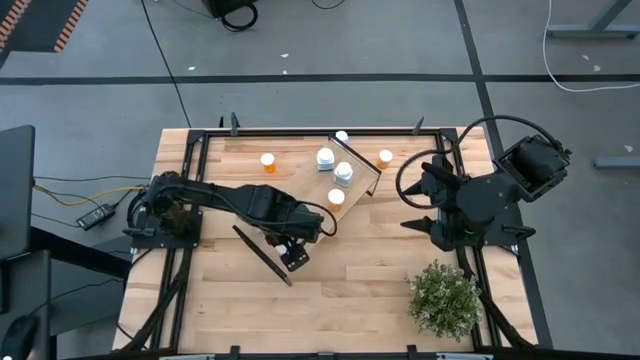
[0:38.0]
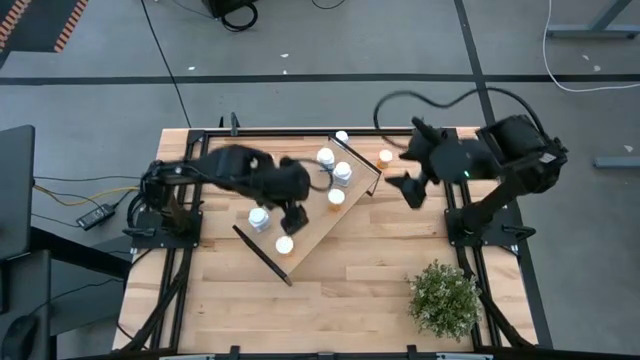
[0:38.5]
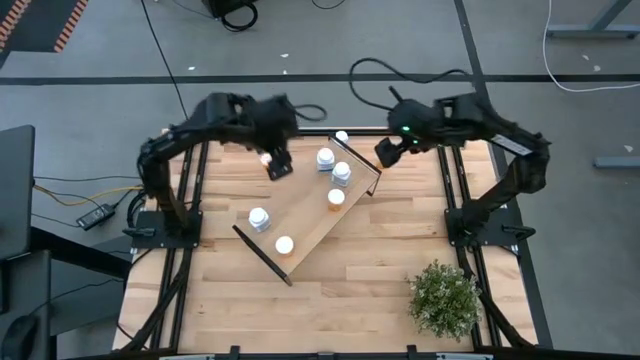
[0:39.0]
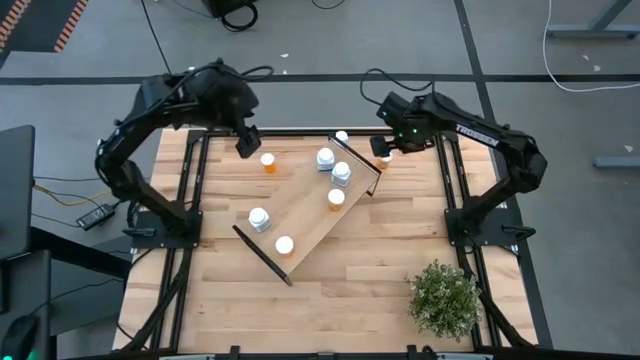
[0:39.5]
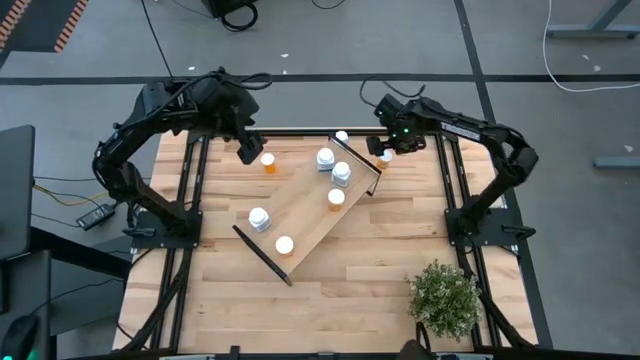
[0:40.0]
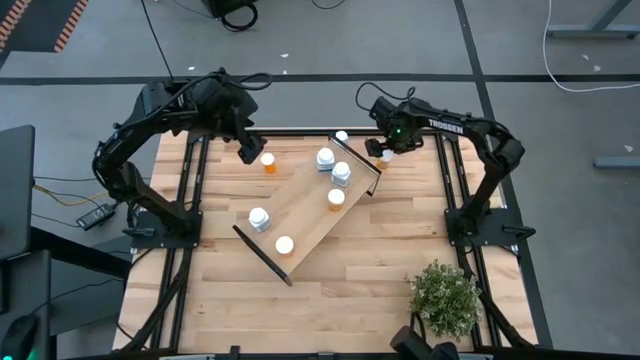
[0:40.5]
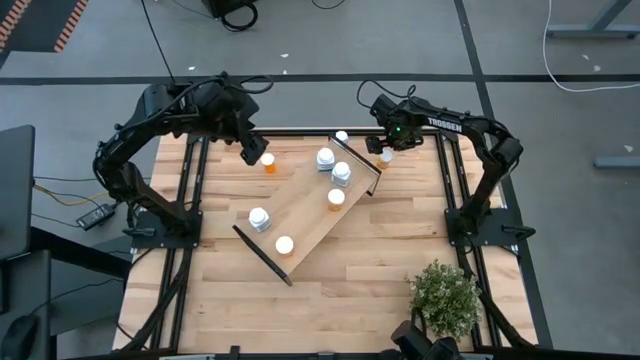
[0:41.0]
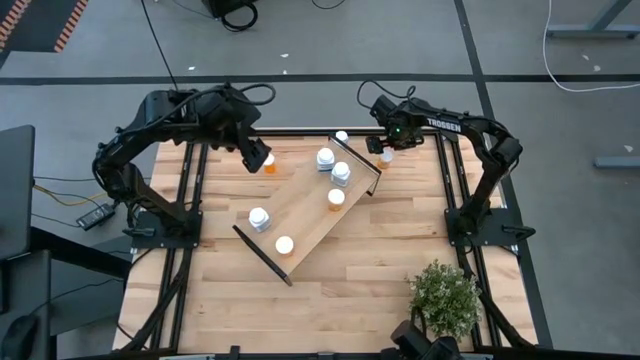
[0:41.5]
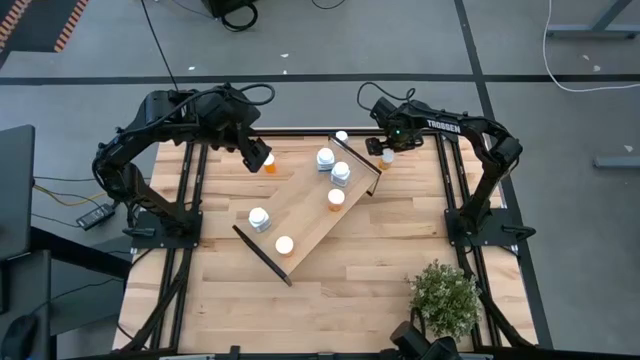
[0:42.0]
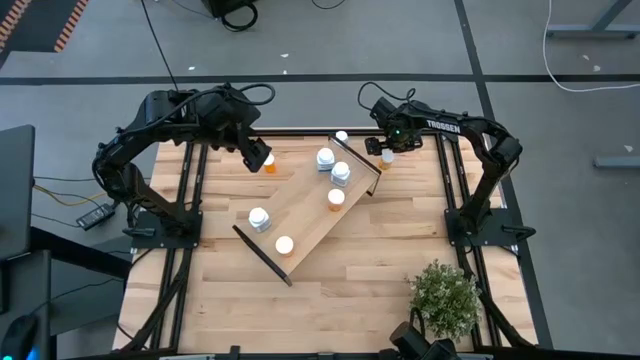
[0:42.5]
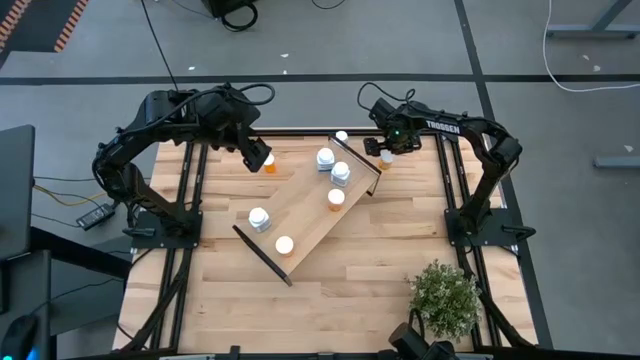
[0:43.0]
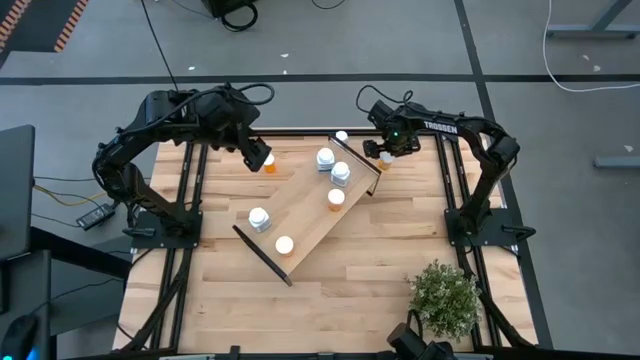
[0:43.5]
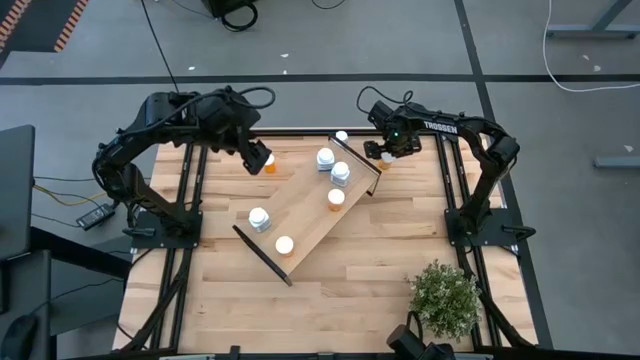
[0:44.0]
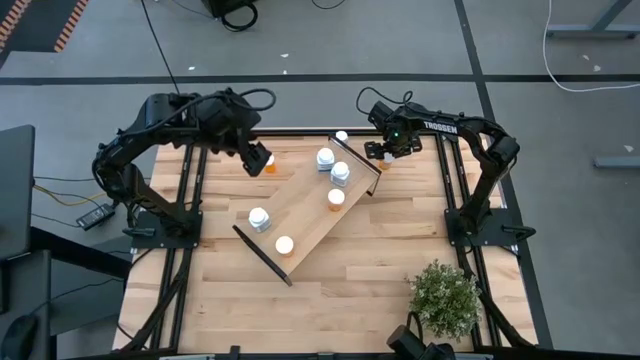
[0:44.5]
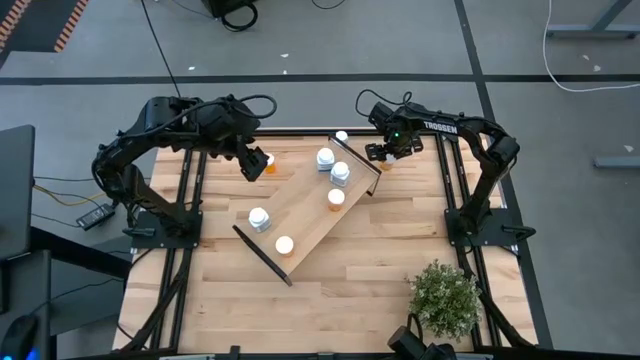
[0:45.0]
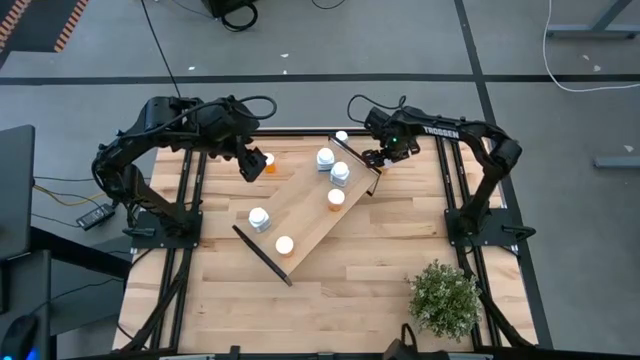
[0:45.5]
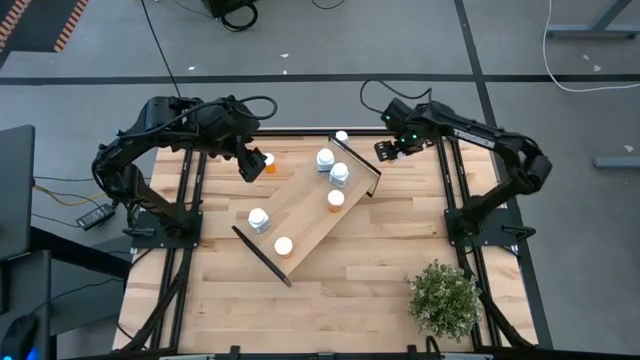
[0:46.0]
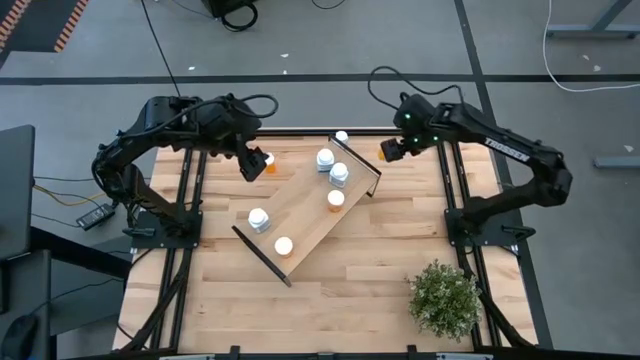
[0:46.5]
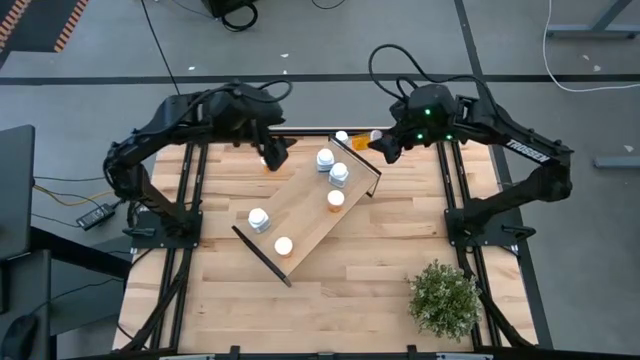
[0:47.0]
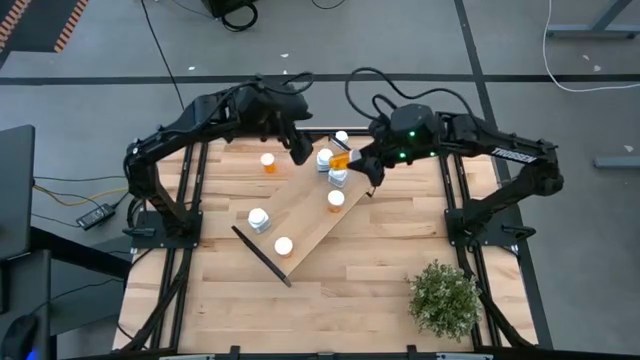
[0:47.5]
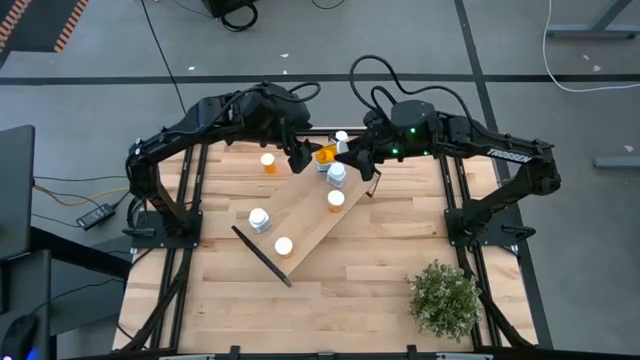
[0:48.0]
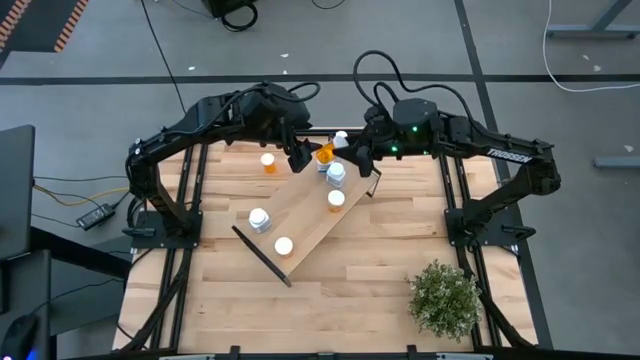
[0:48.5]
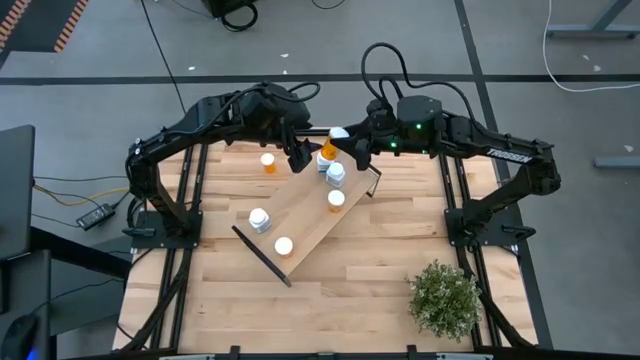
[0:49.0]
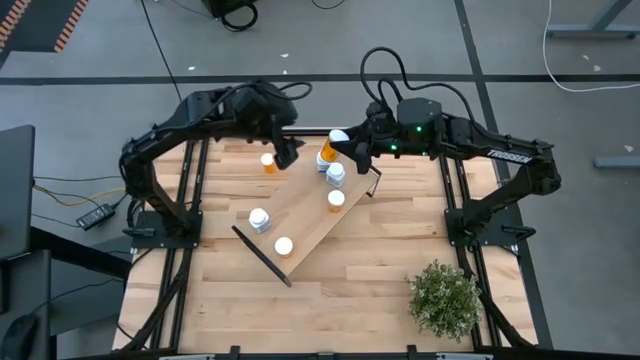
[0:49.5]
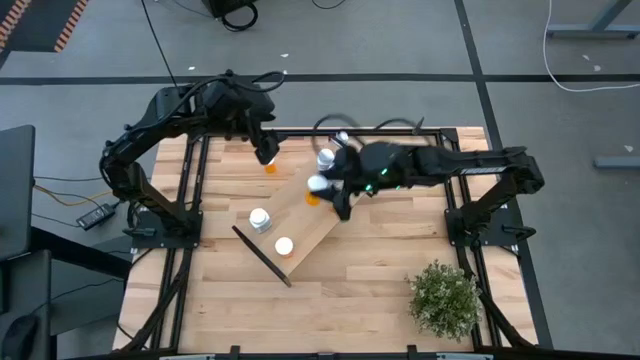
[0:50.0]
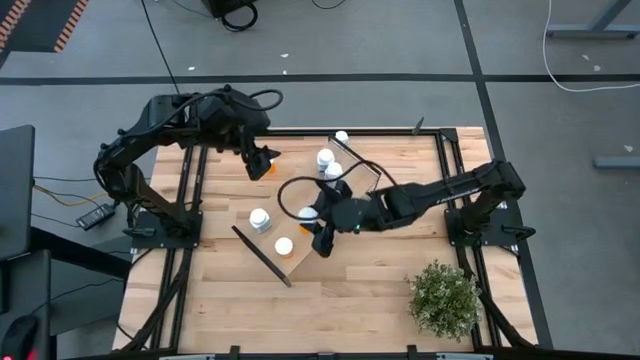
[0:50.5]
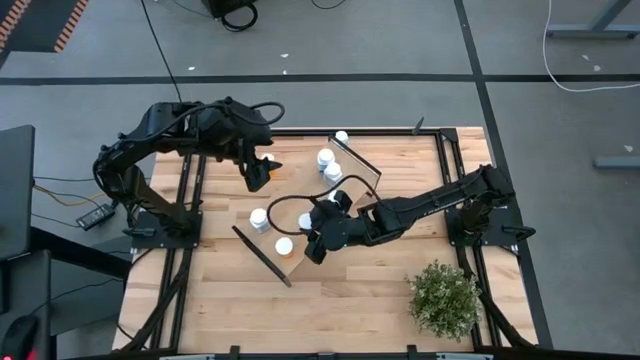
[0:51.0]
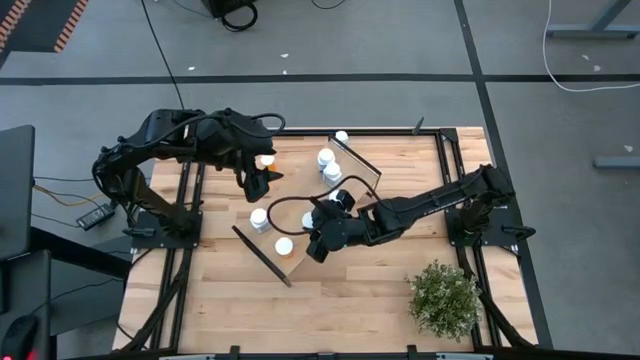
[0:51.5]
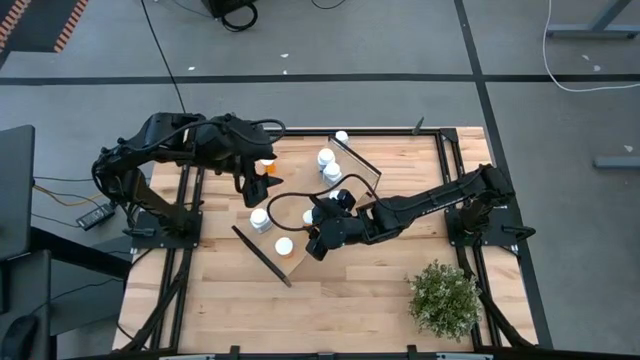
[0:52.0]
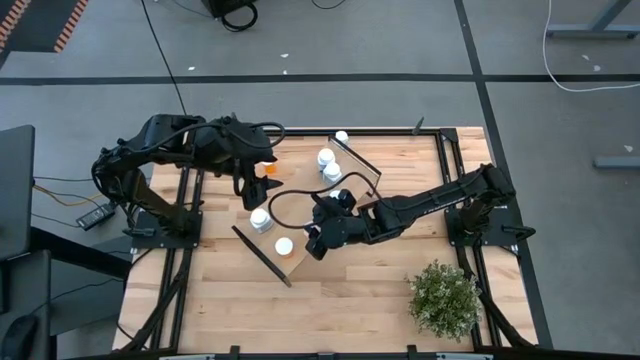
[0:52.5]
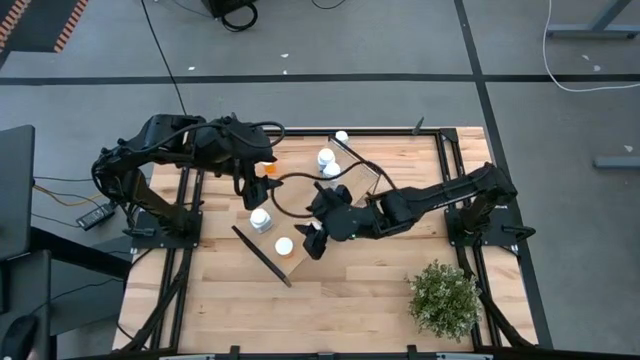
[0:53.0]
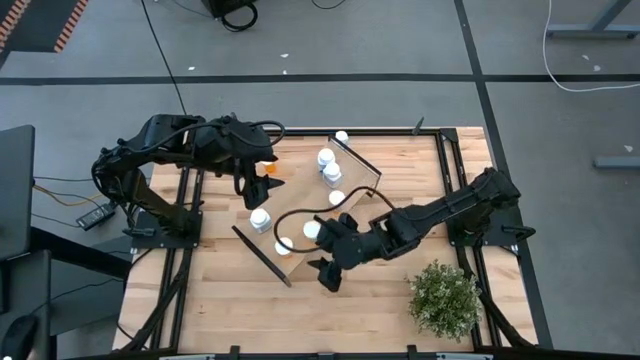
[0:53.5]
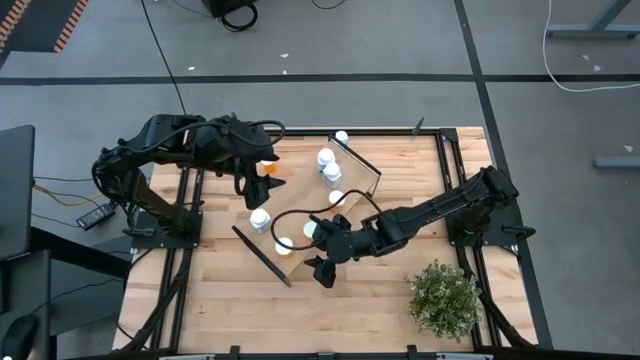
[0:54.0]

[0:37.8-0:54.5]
Task: Pick and place medicine bottles onto shelf by color
Put the orange pill bottle on the shelf

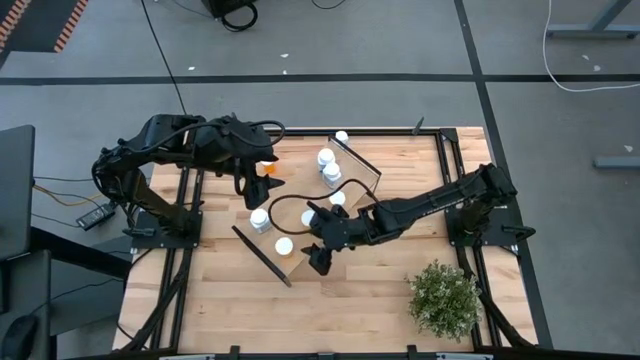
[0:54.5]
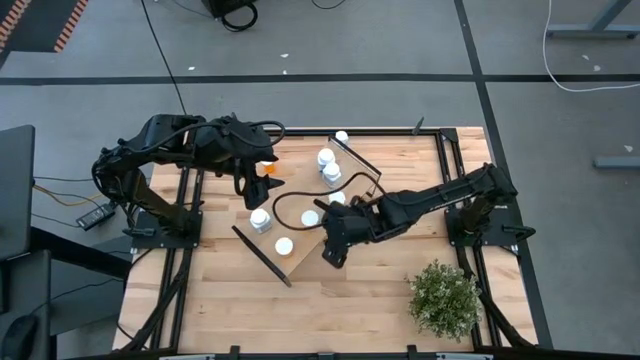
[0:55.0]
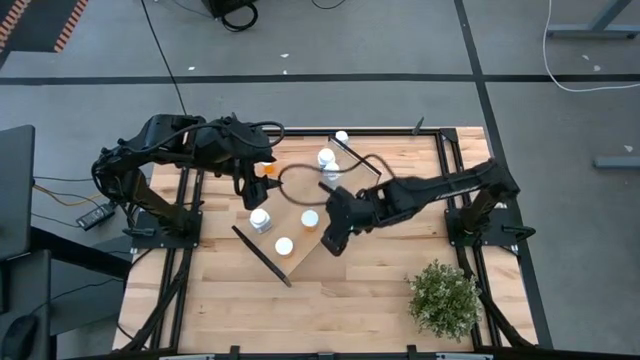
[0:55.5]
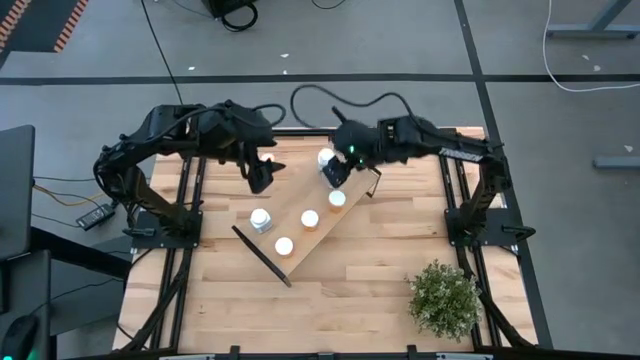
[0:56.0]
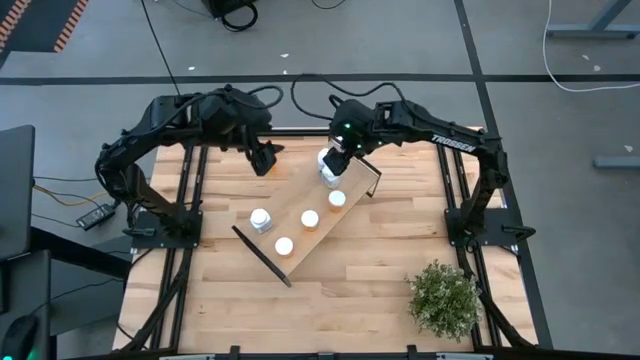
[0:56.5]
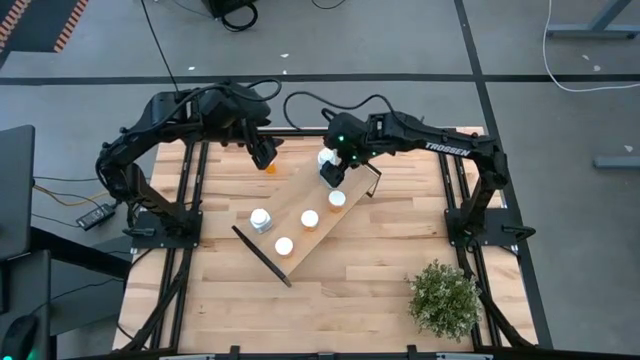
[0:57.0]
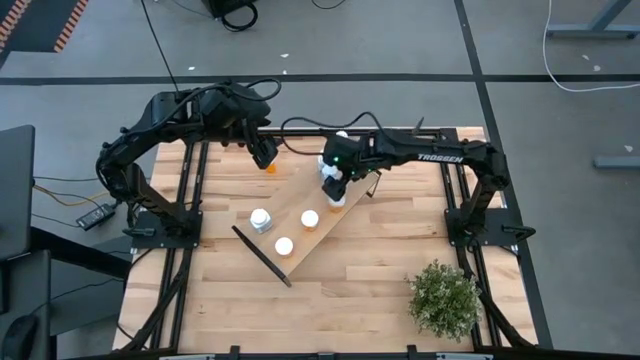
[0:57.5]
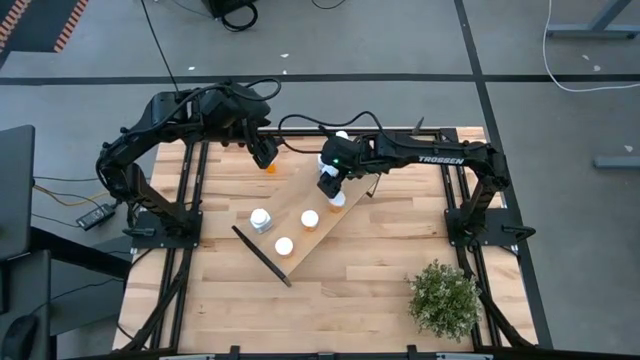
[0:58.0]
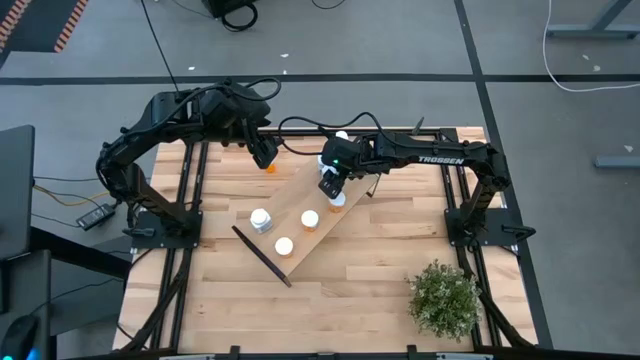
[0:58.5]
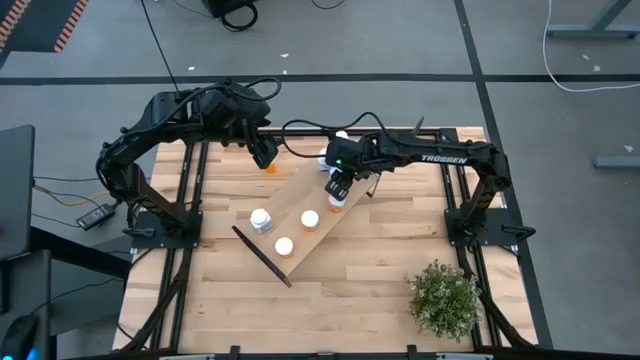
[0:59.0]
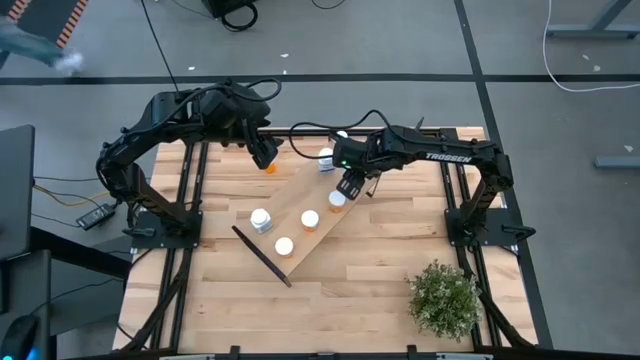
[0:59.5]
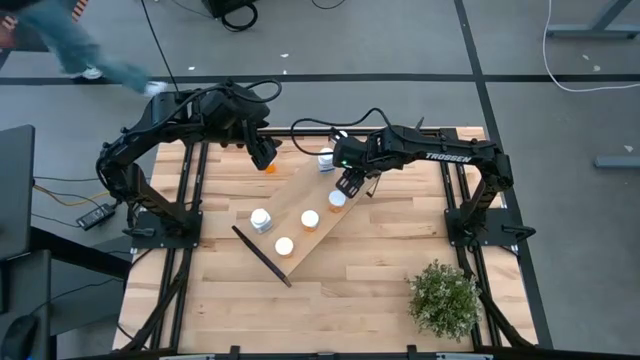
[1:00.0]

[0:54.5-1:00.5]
Adjust the white pill bottle on the shelf
